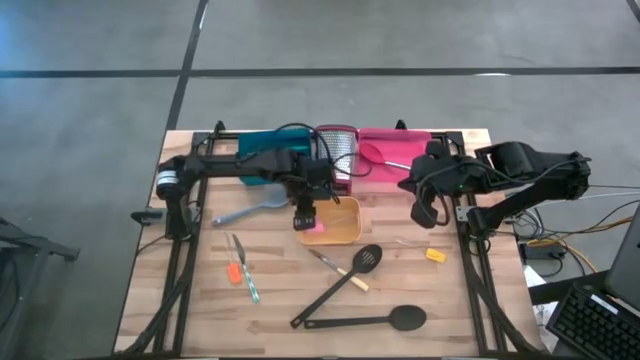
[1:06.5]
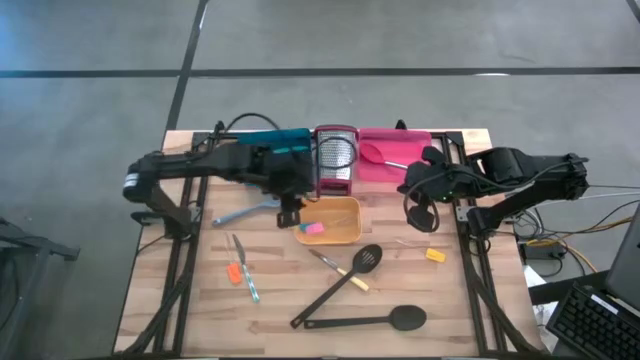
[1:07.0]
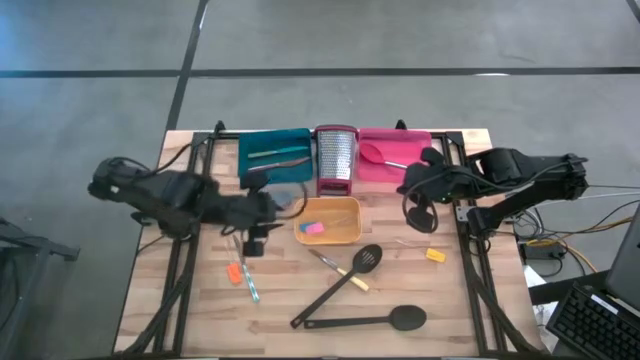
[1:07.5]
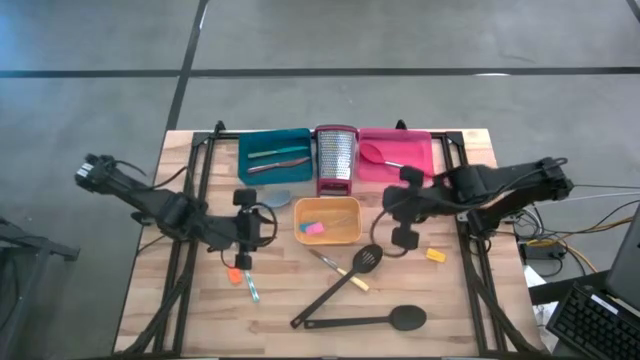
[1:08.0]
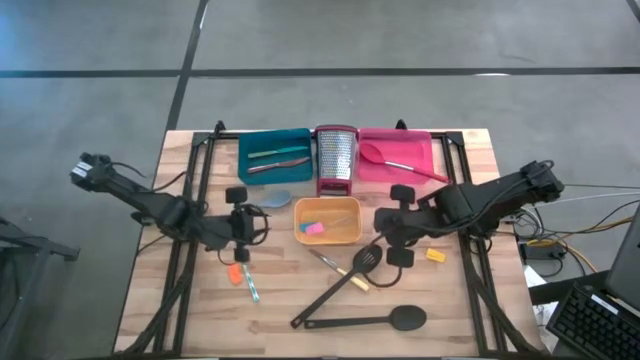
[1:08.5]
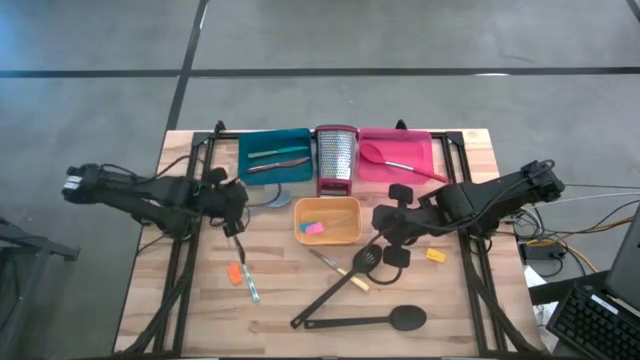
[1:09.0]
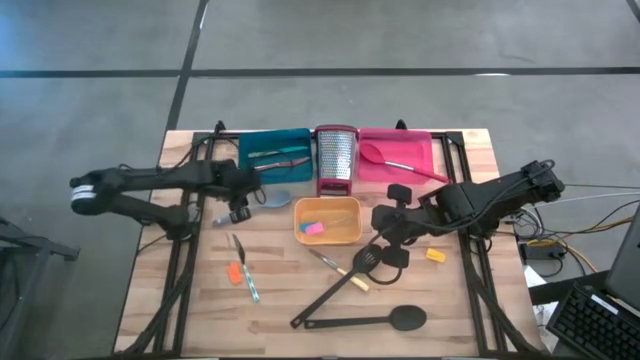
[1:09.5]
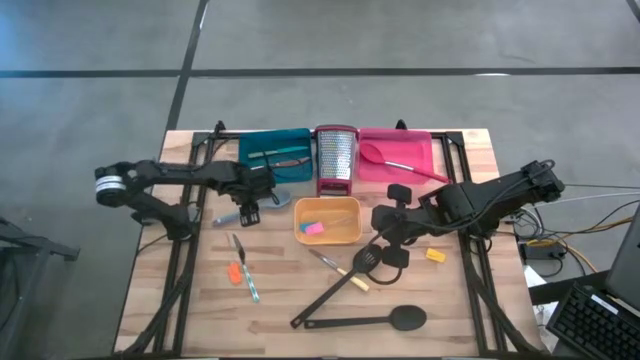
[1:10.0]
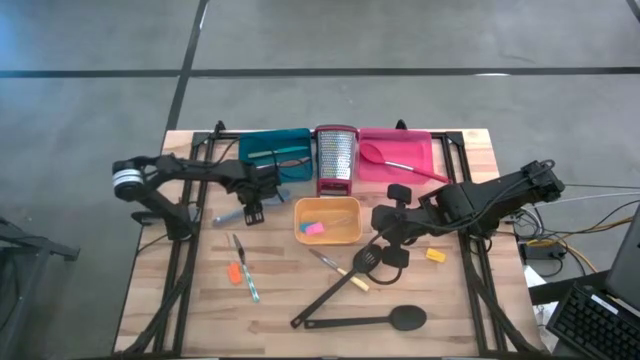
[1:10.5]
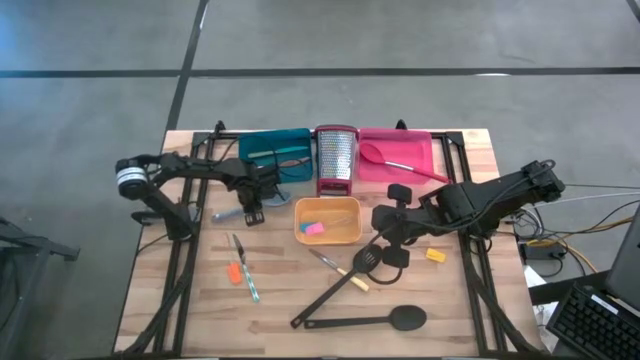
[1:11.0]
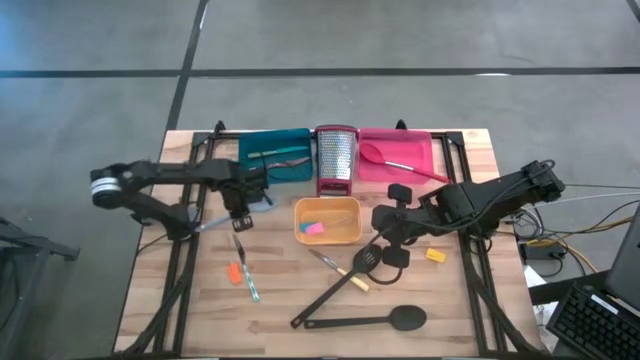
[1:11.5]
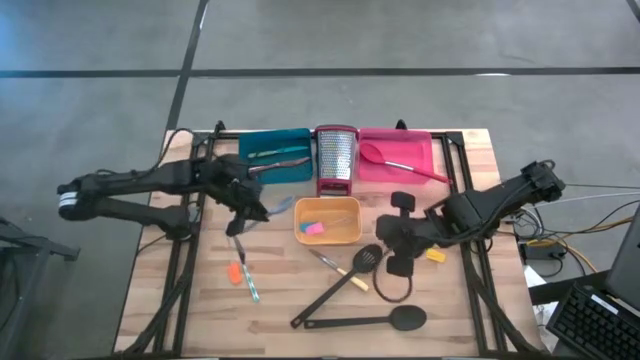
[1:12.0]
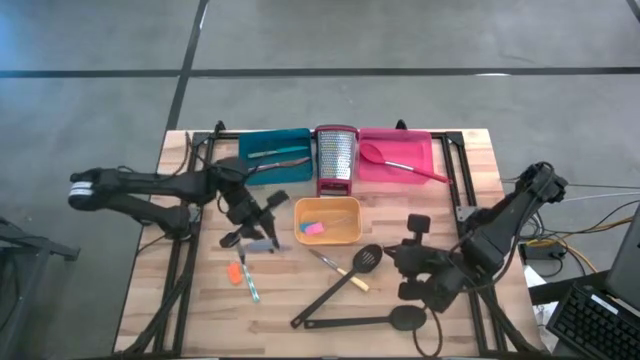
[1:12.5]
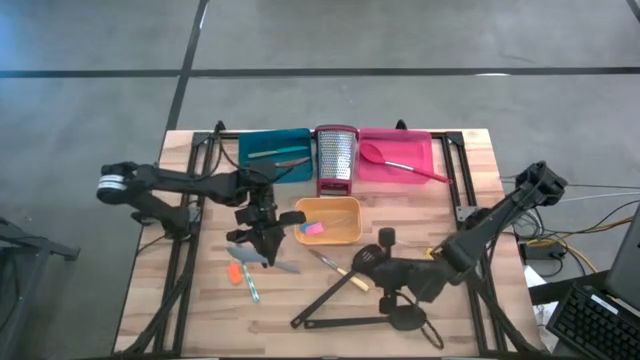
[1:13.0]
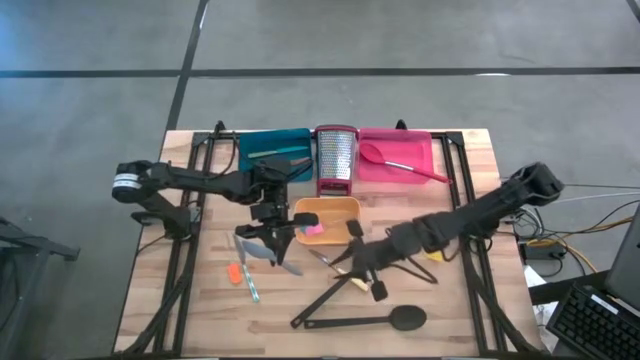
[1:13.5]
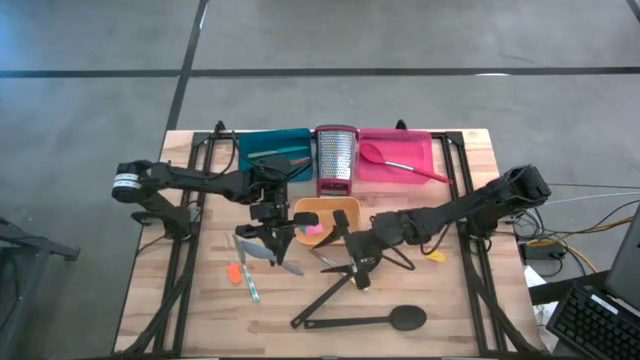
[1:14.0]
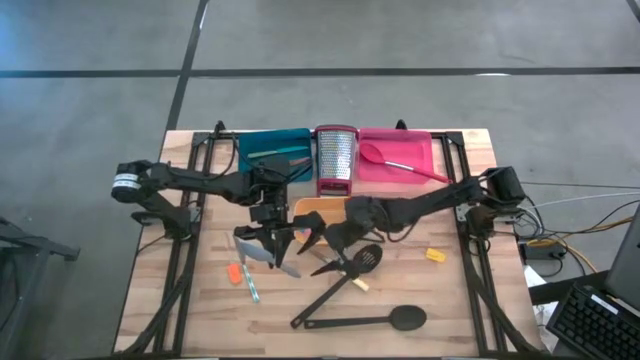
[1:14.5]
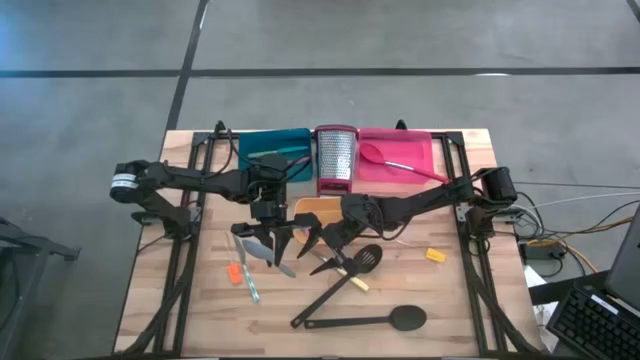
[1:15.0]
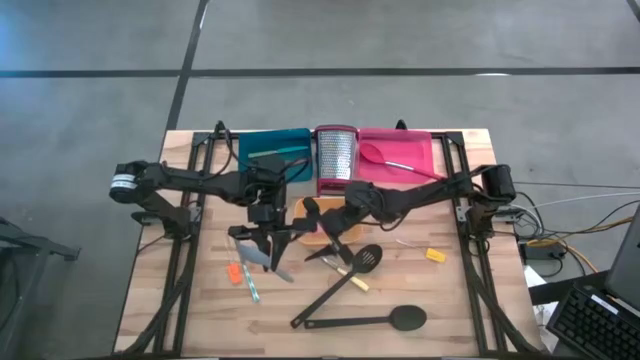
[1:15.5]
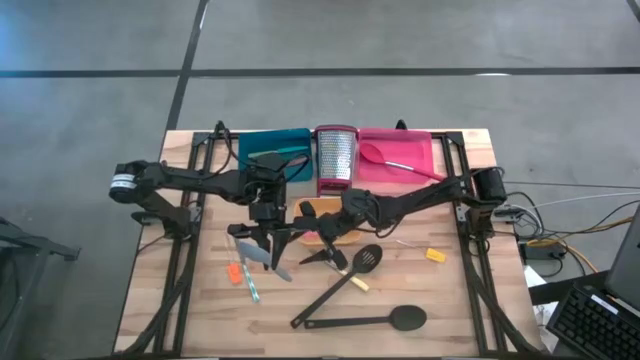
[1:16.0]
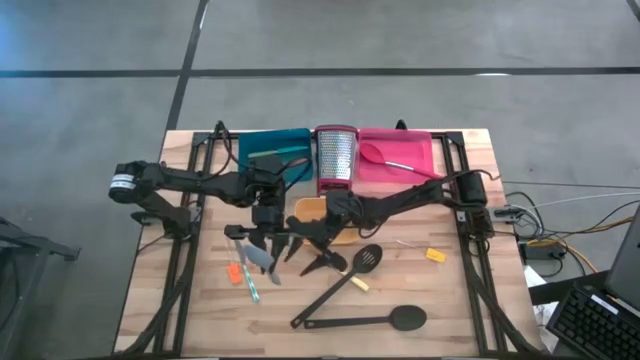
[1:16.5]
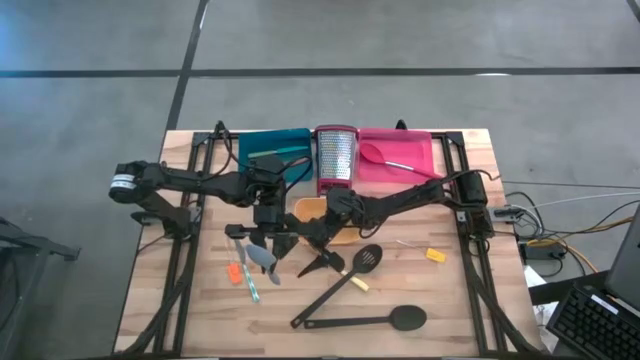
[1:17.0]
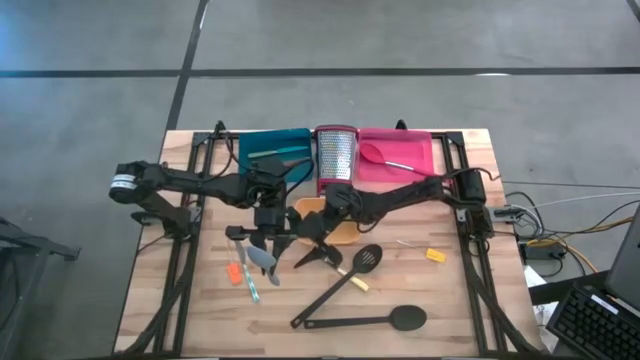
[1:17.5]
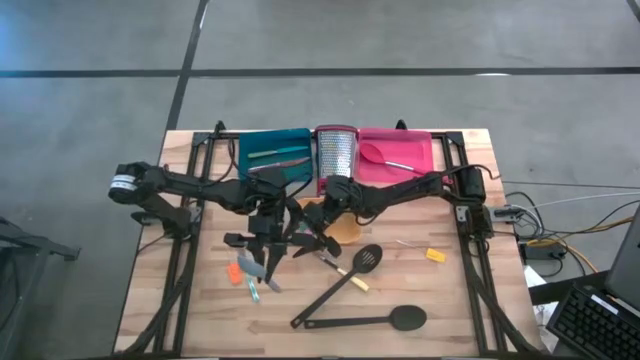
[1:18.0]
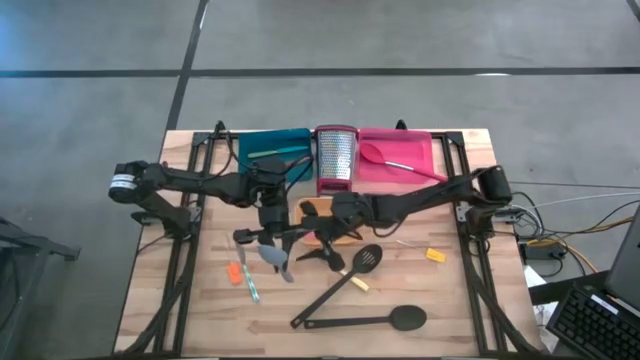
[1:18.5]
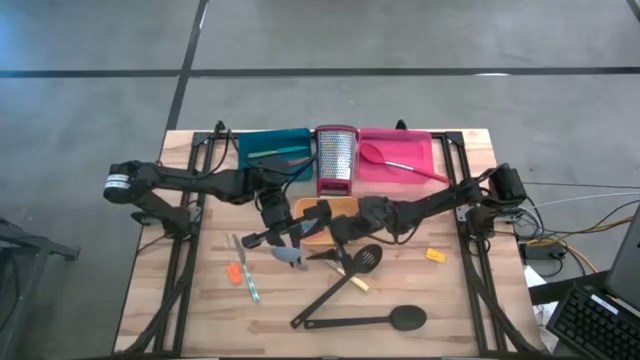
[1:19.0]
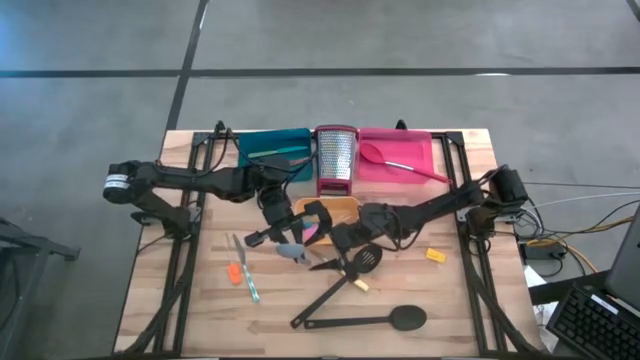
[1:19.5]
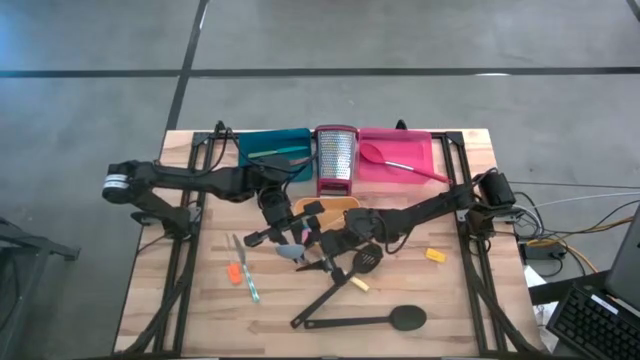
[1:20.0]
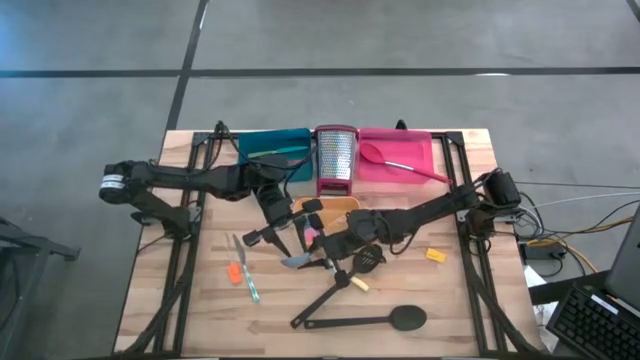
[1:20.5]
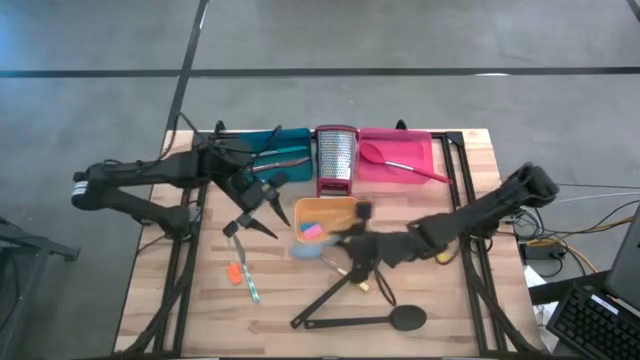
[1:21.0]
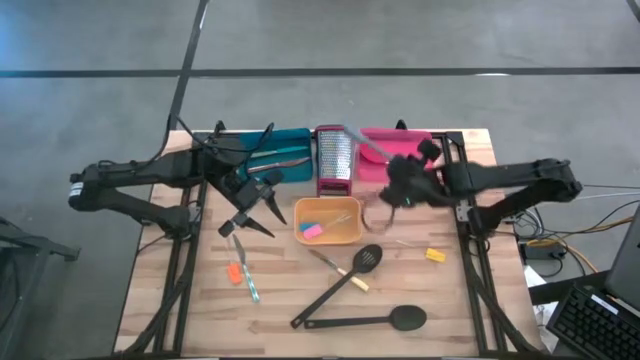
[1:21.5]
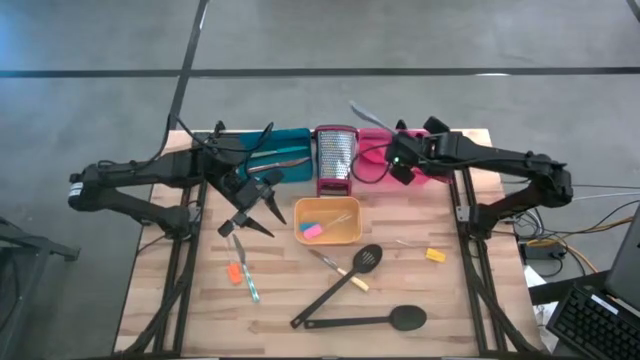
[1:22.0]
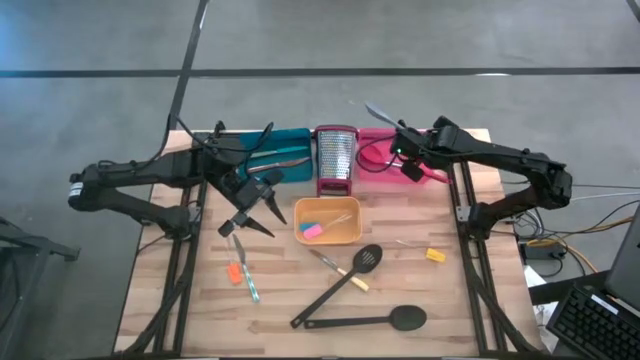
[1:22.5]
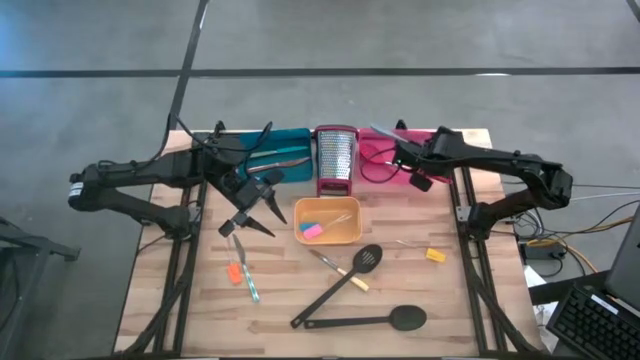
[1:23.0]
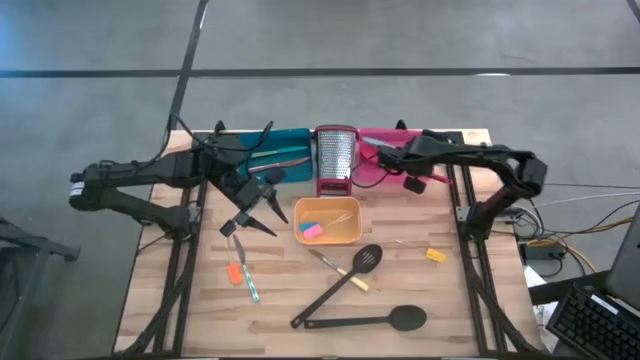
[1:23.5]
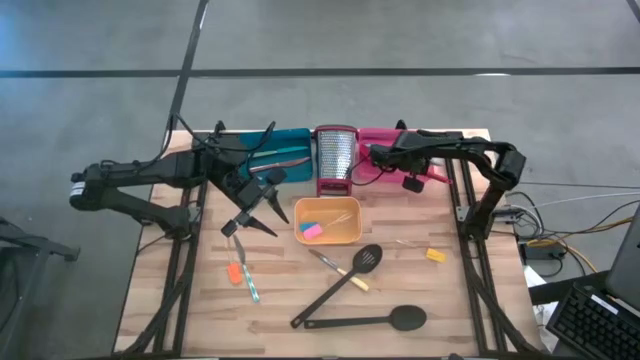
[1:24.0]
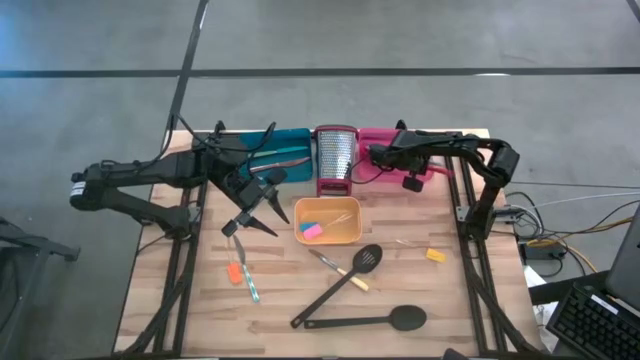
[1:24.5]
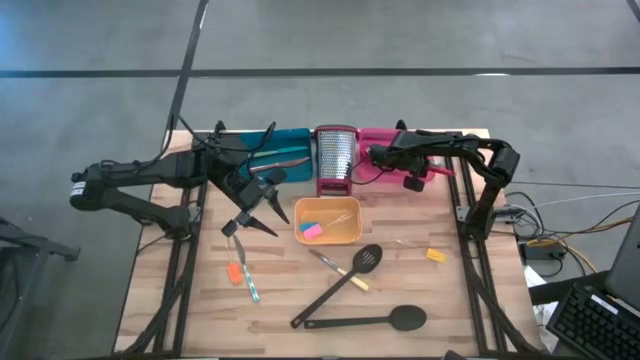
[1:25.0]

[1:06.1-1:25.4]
Task: Pick & Place Kitchen Items
Put the gray serving spoon into the pink bin

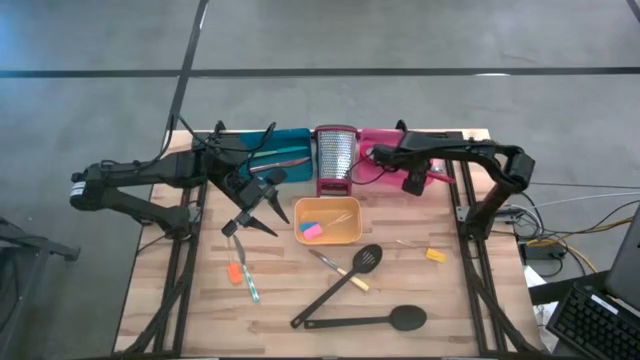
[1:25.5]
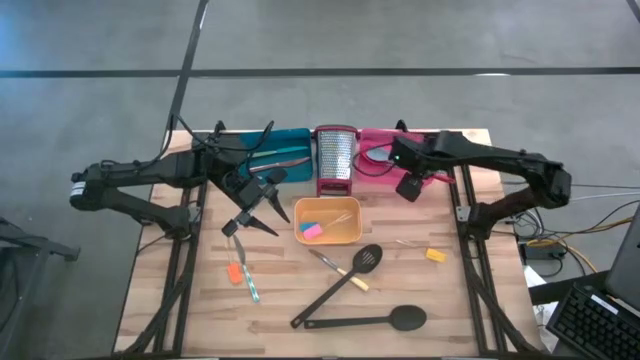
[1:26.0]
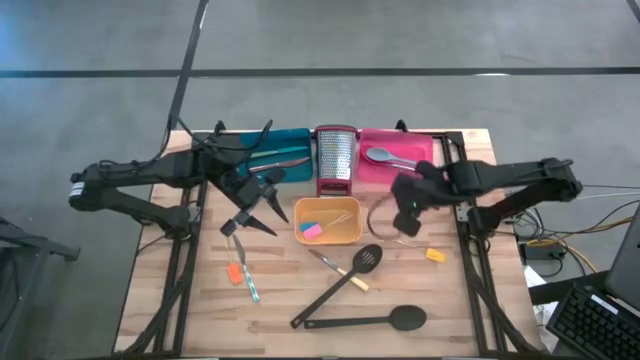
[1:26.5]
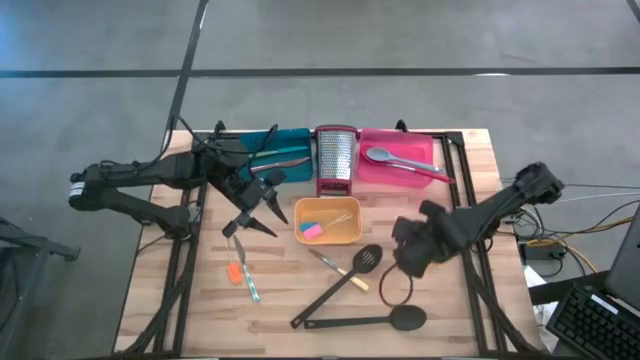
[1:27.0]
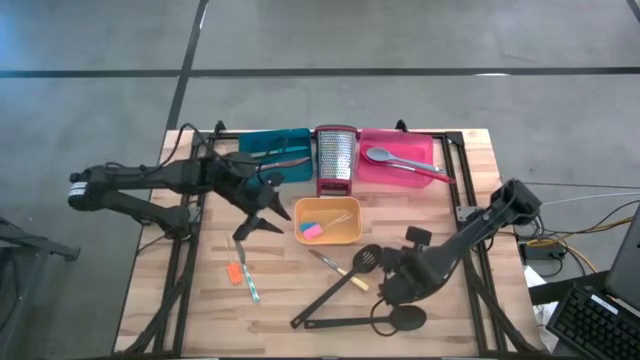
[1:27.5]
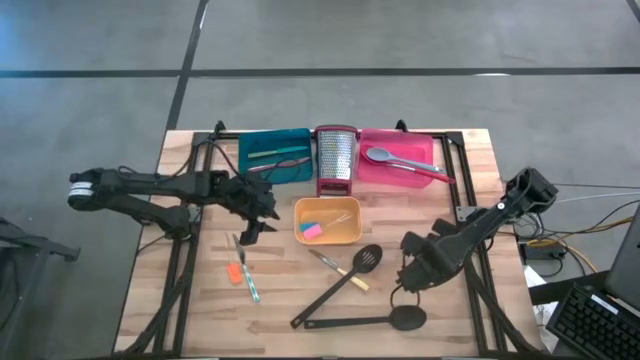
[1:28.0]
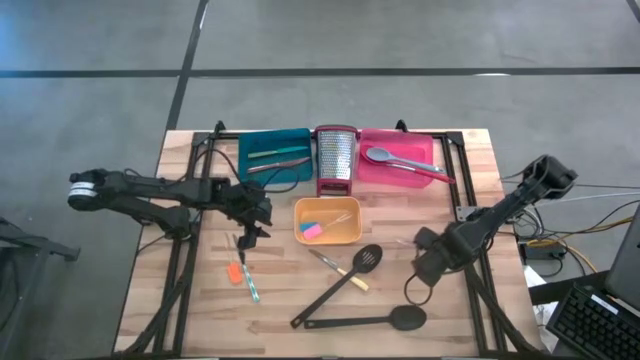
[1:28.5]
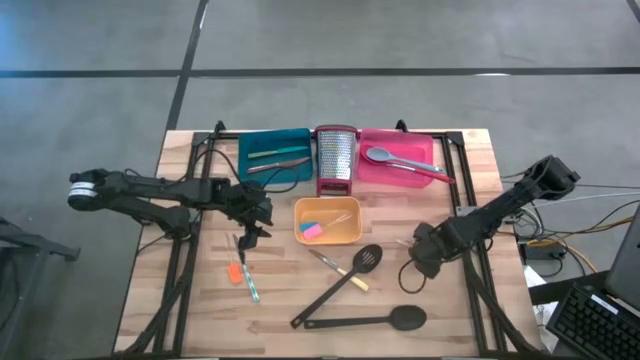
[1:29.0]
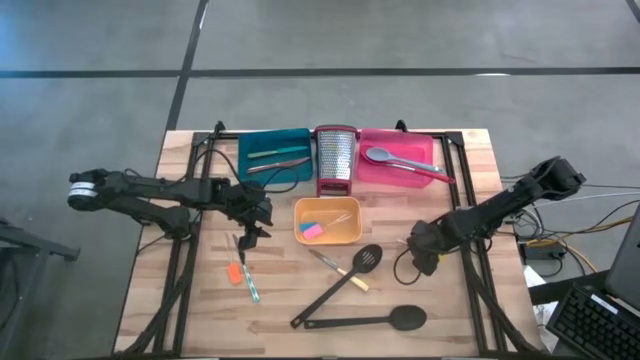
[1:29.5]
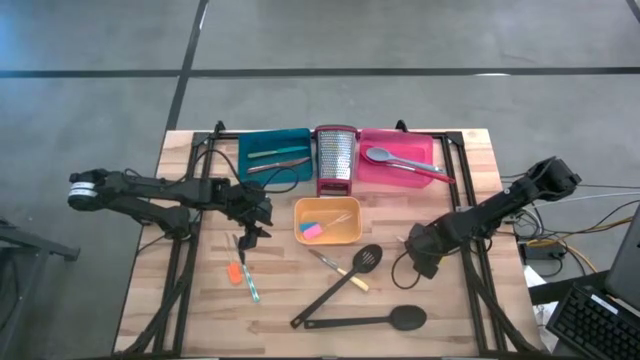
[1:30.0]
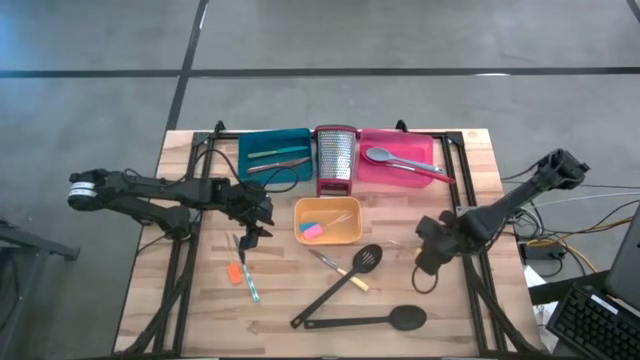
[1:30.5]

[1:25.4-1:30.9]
Put the yellow spatula into the yellow bin
